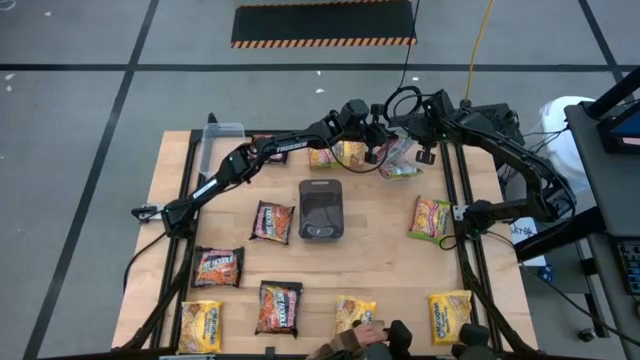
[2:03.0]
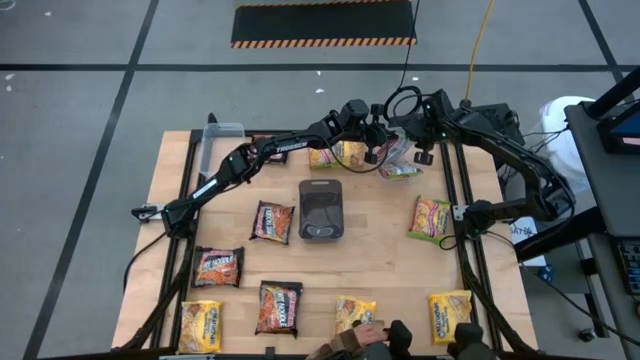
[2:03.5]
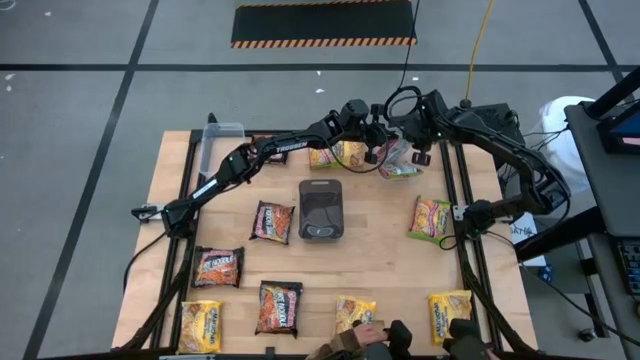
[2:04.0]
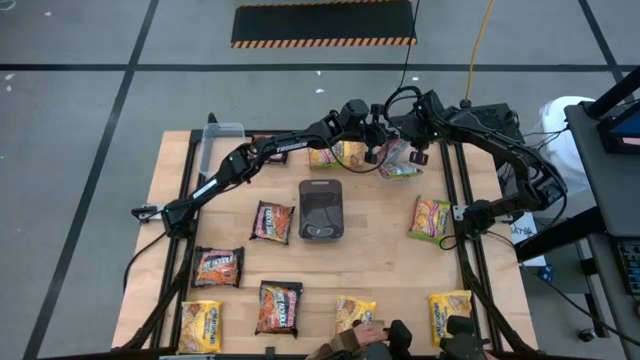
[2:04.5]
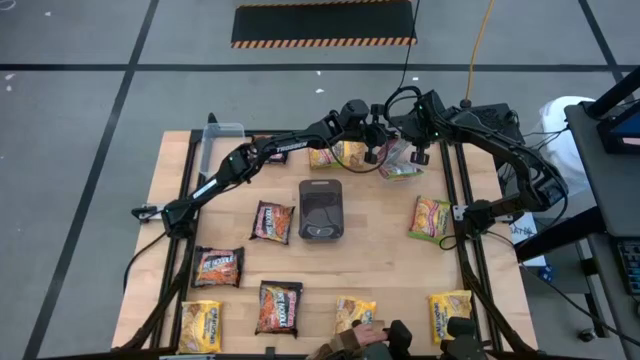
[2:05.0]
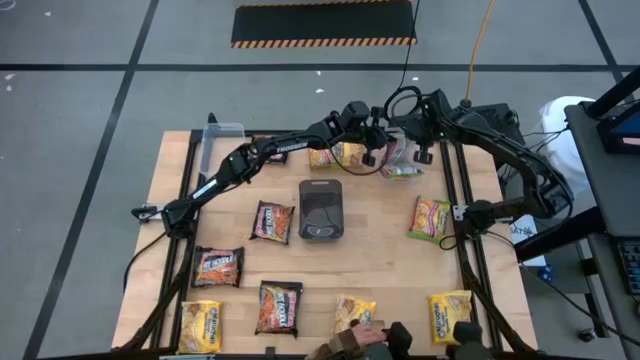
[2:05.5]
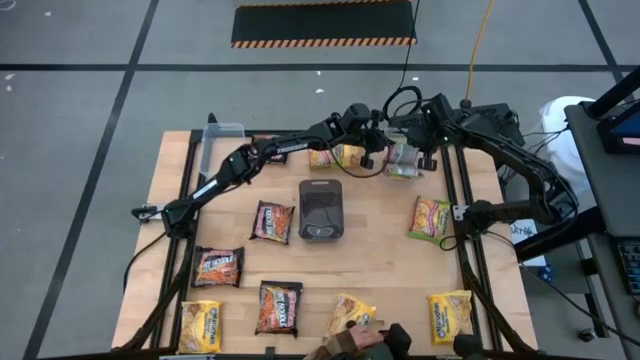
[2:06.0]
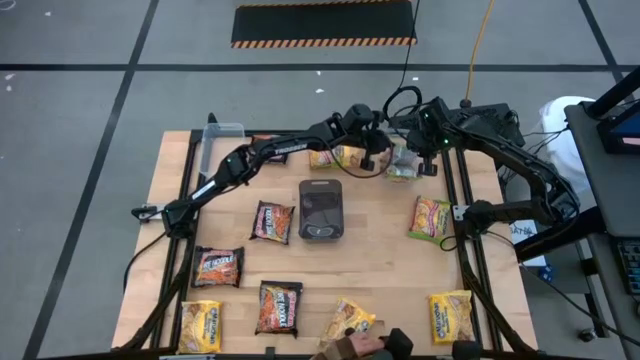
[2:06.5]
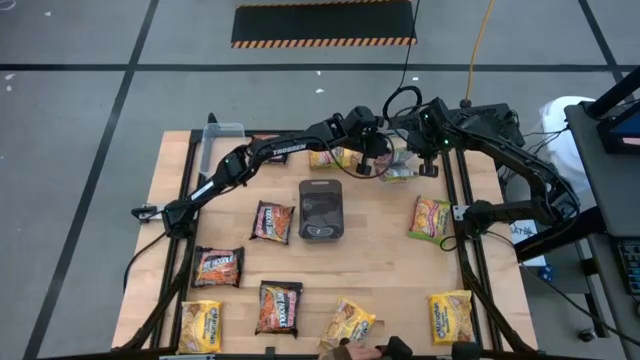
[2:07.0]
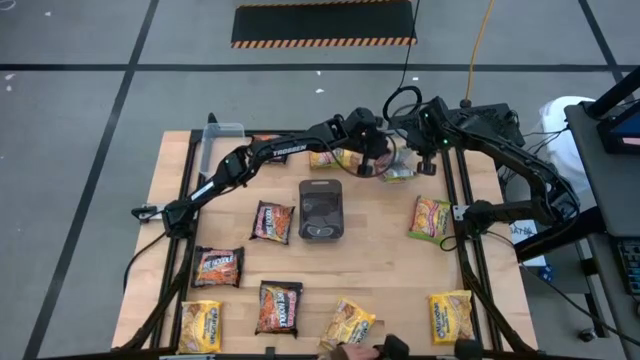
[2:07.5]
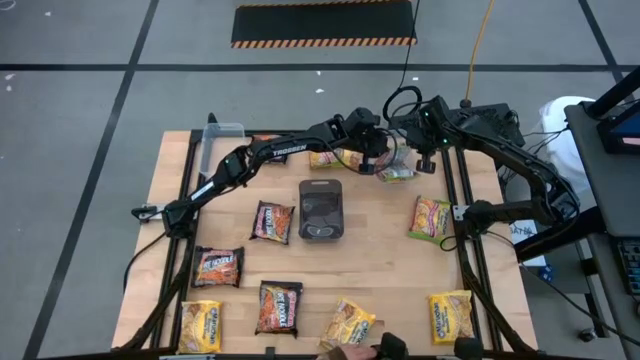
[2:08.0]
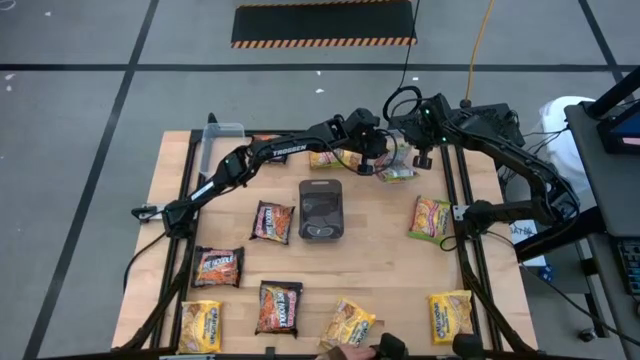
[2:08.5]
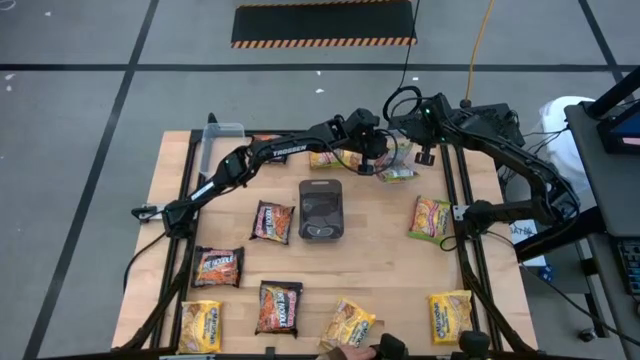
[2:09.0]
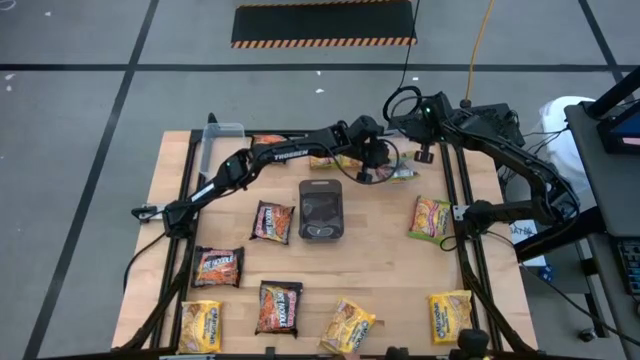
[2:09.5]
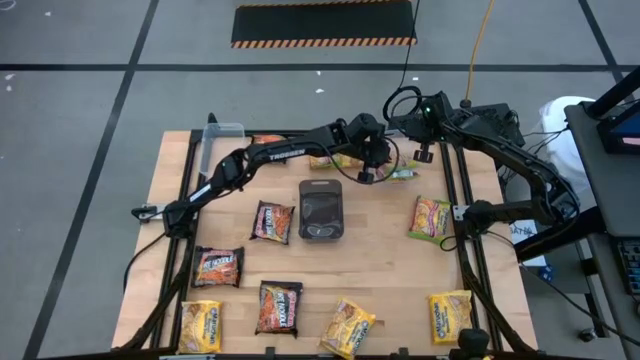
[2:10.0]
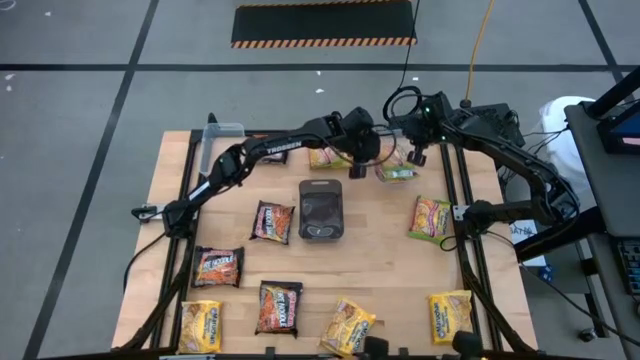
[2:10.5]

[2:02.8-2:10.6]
Task: Sort Maruchan noodles
Adjust the green noodle pack

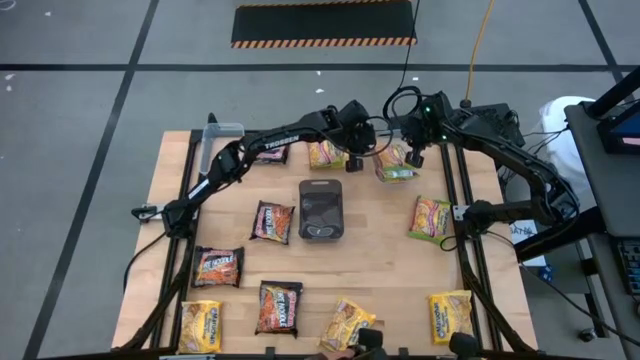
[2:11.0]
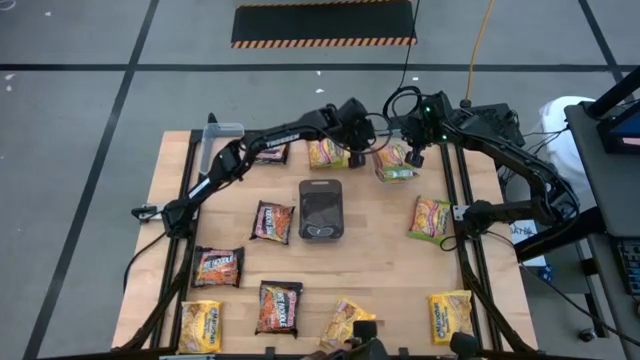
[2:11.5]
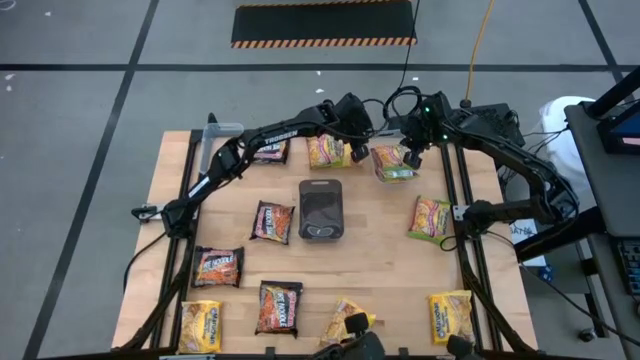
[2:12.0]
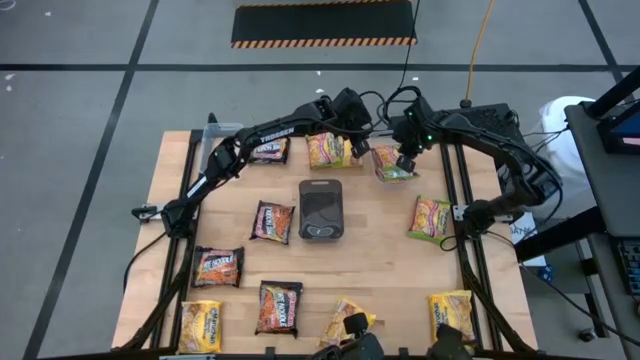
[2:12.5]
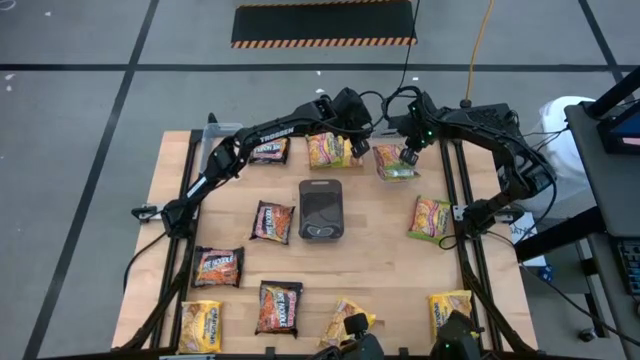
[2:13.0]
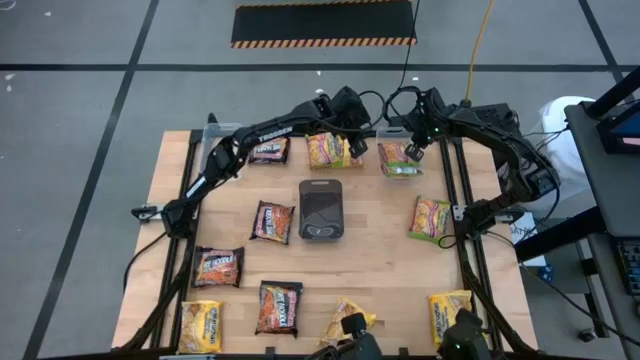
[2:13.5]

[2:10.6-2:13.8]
Adjust the right transparent bin

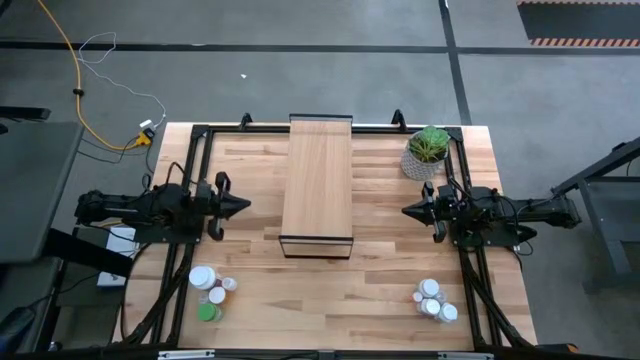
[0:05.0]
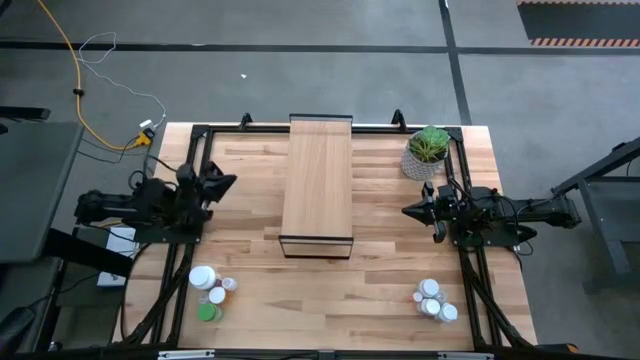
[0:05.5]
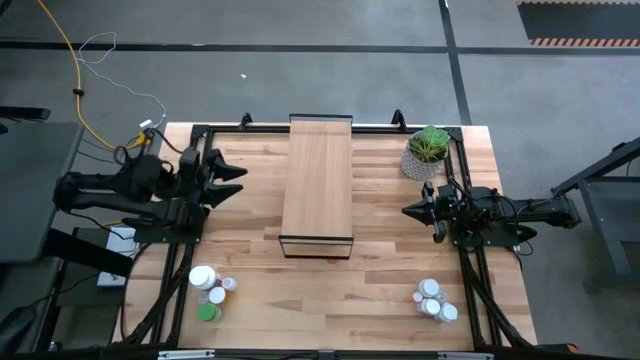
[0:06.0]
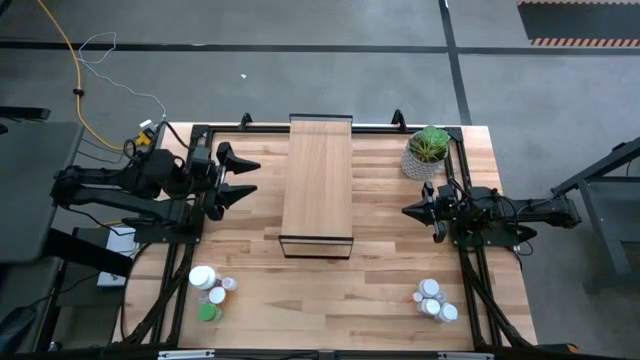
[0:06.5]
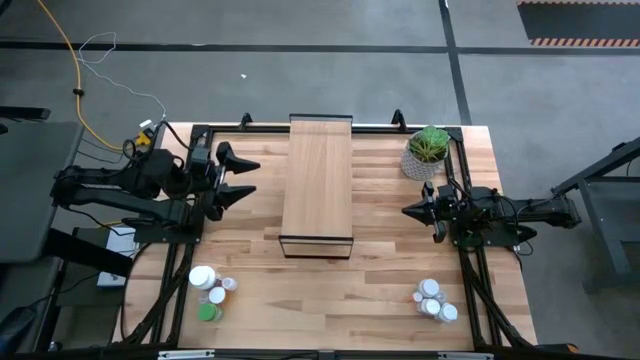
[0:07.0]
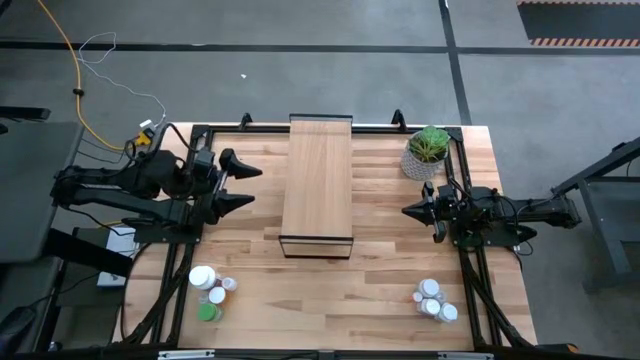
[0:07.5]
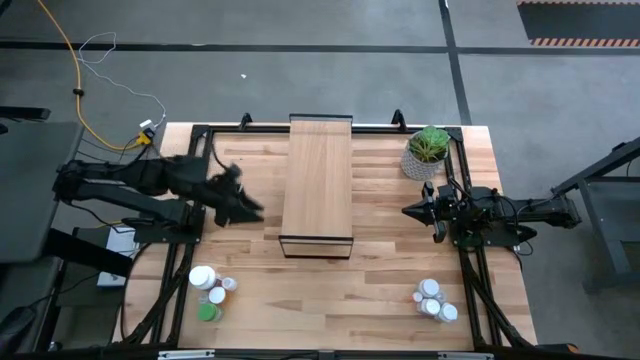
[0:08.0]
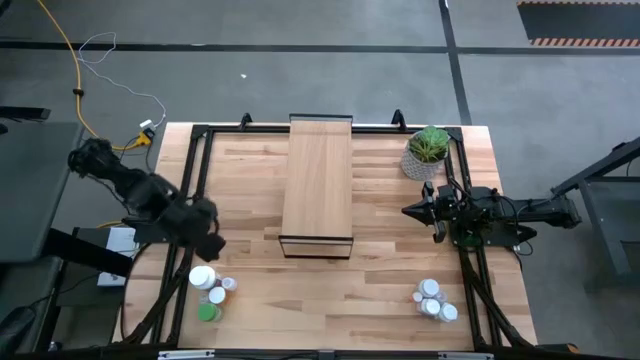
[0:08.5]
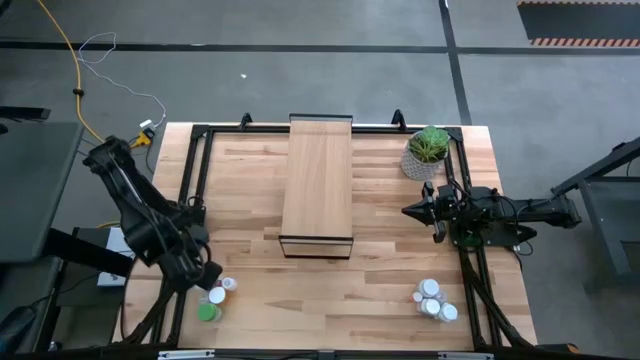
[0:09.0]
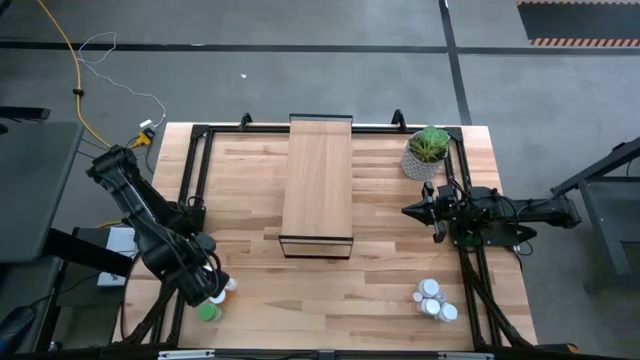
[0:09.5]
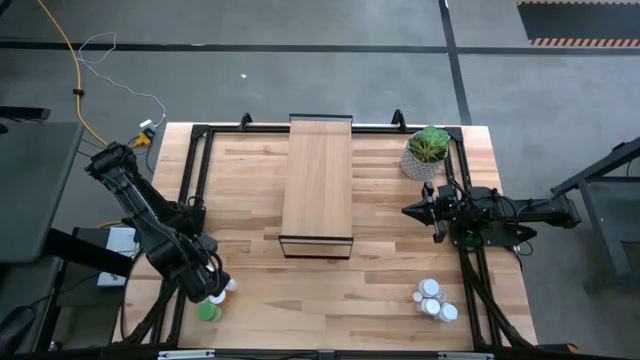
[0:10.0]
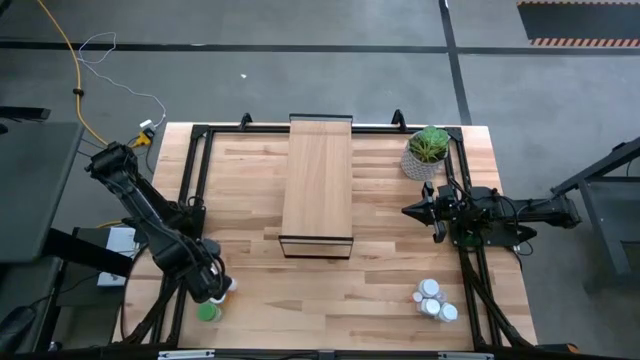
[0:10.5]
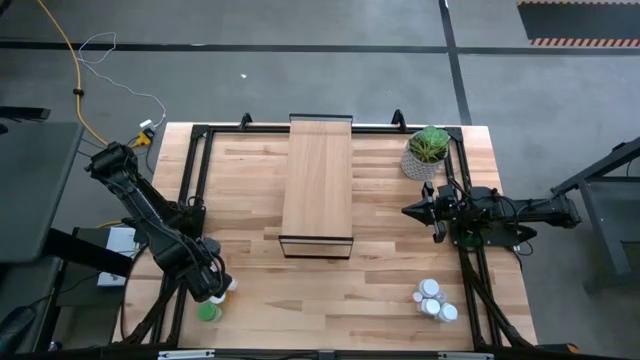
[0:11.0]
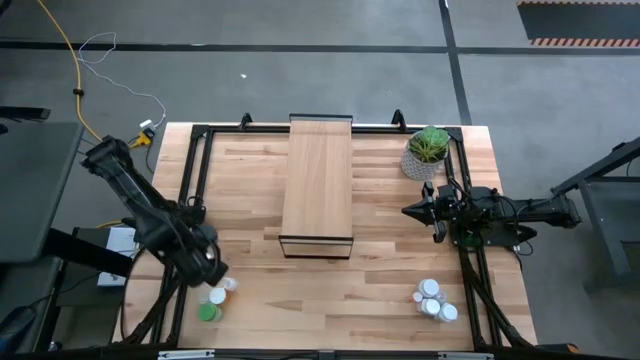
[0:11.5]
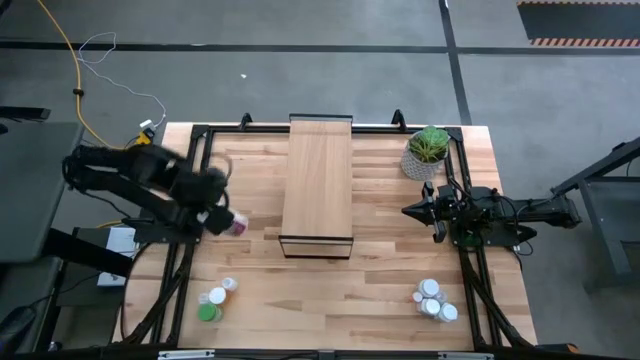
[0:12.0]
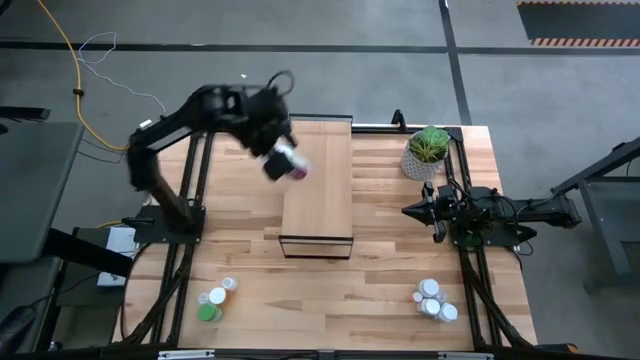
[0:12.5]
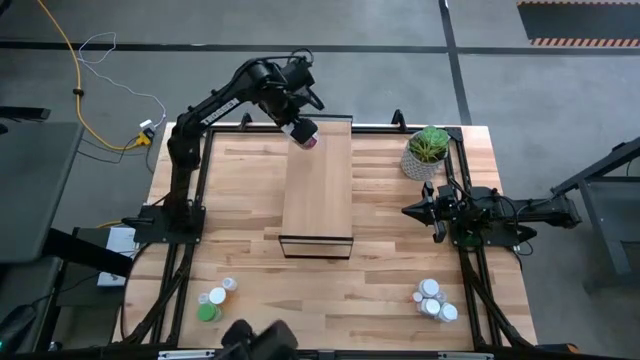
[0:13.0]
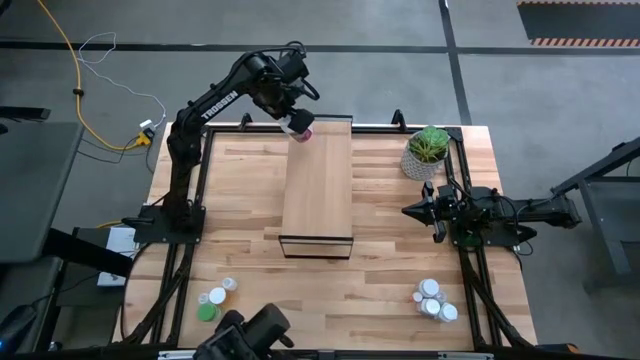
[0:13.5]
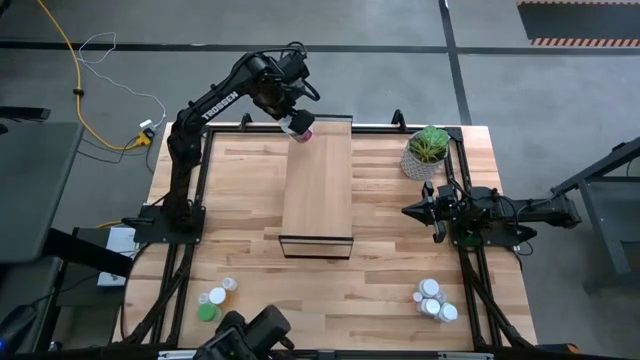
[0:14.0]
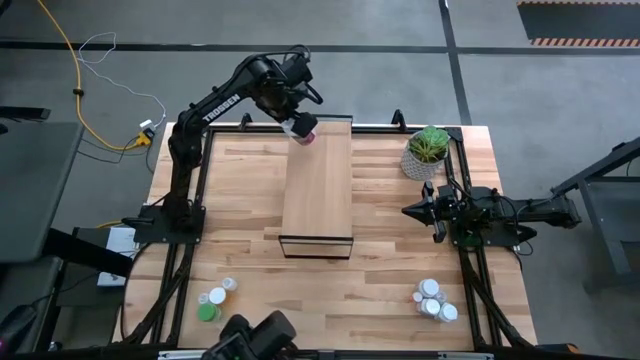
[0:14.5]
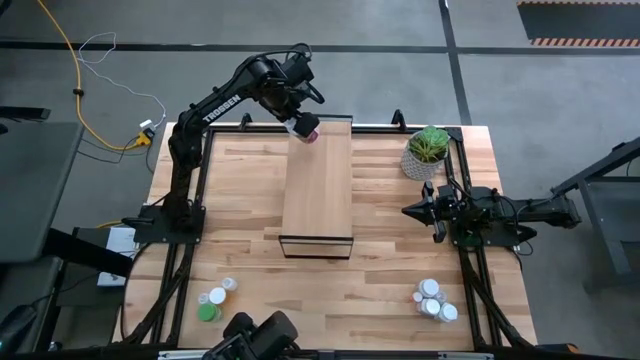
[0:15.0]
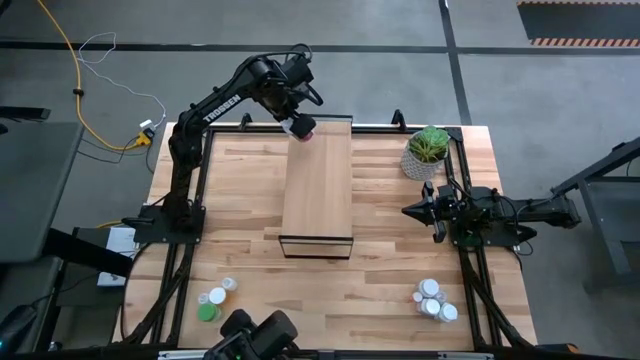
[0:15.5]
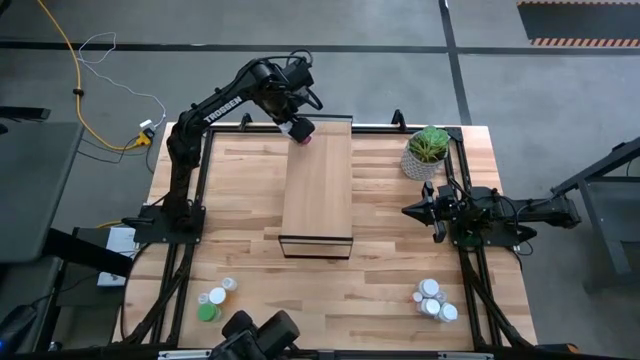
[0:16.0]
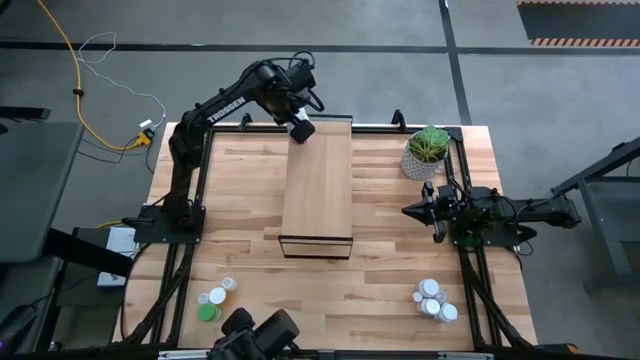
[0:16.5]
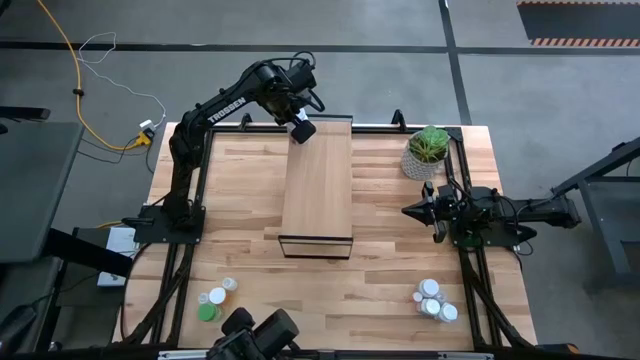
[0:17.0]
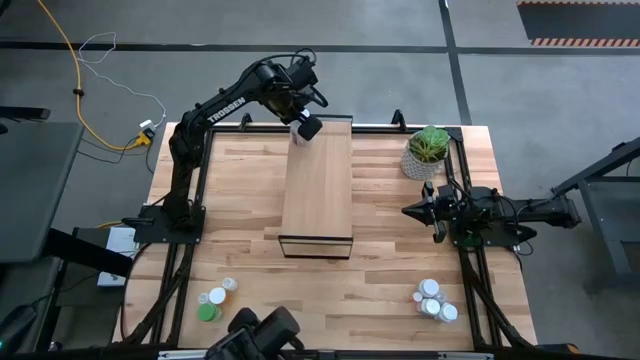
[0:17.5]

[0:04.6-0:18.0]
Task: Pick and place medicine bottles onto shelf by color
Put the red medicine bottle on the shelf
